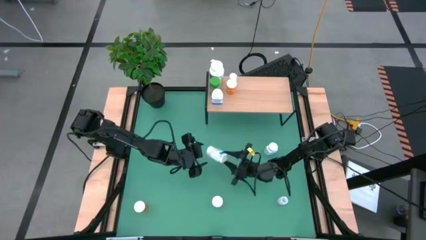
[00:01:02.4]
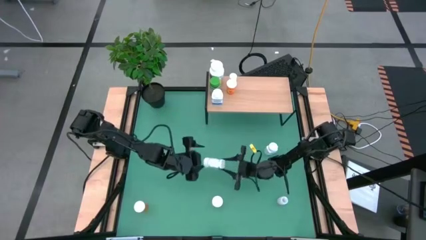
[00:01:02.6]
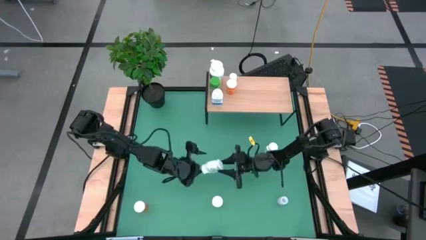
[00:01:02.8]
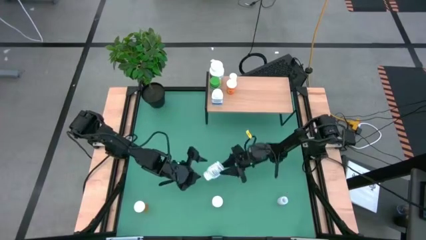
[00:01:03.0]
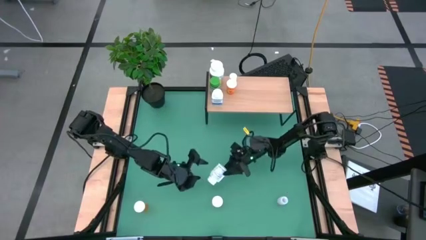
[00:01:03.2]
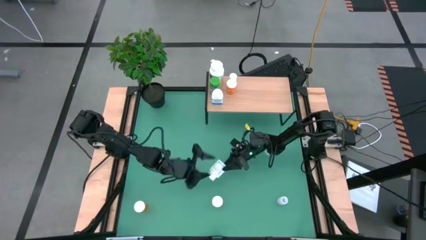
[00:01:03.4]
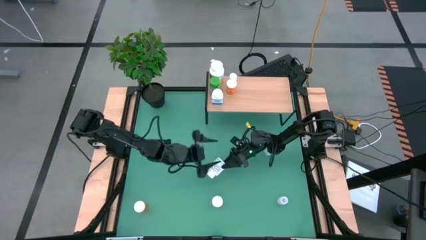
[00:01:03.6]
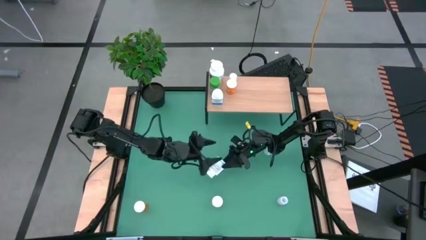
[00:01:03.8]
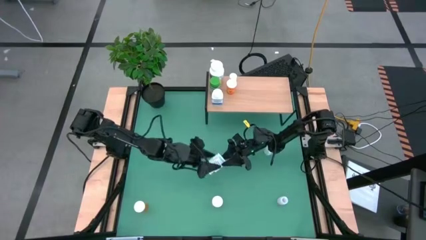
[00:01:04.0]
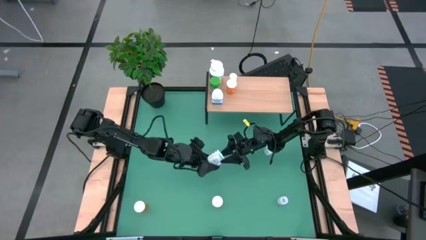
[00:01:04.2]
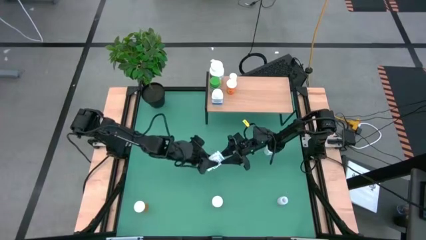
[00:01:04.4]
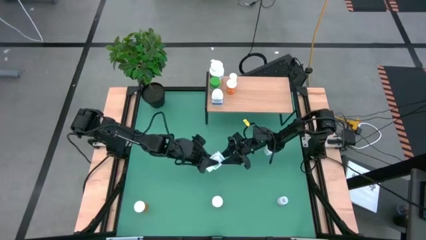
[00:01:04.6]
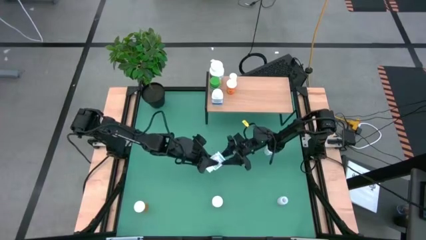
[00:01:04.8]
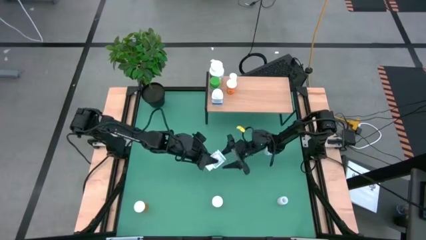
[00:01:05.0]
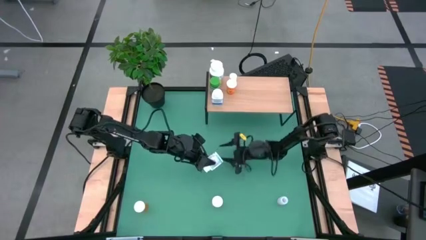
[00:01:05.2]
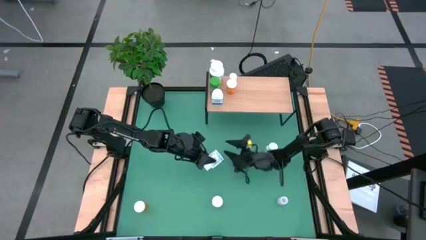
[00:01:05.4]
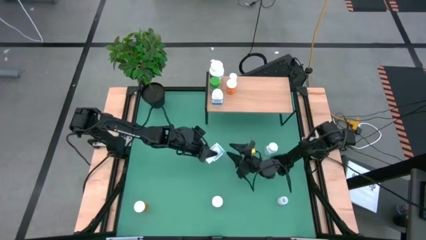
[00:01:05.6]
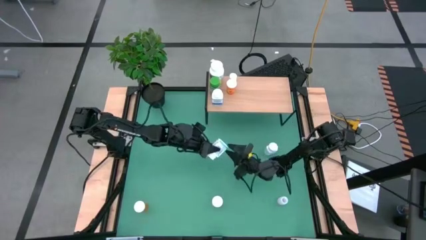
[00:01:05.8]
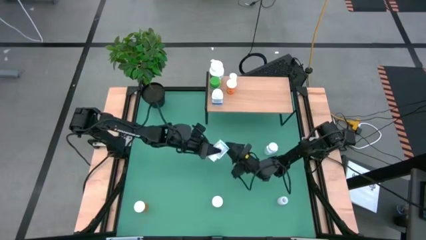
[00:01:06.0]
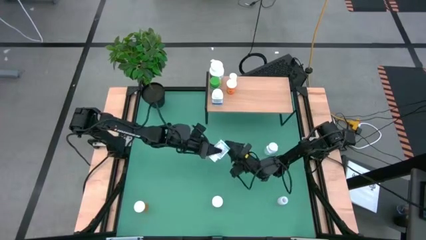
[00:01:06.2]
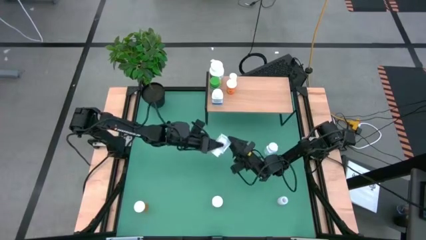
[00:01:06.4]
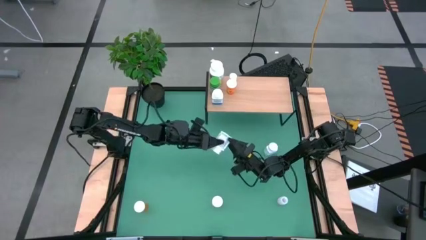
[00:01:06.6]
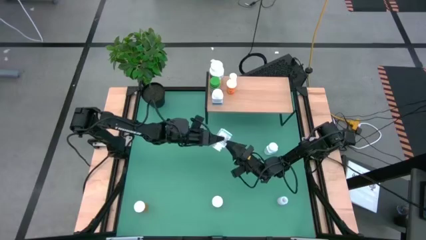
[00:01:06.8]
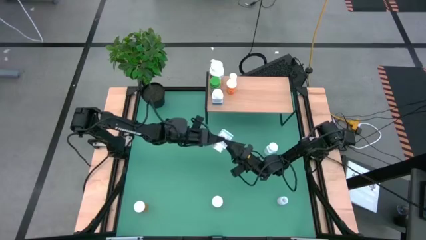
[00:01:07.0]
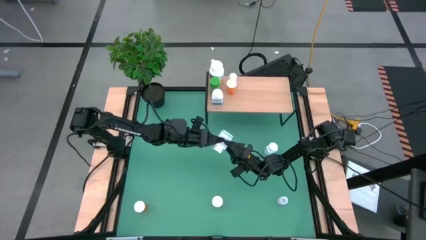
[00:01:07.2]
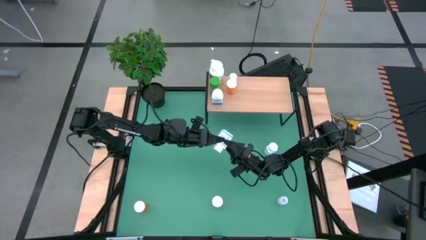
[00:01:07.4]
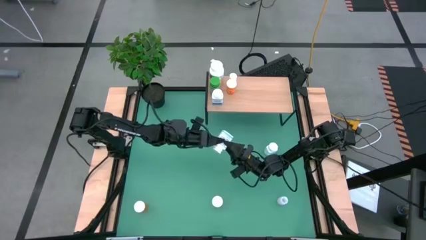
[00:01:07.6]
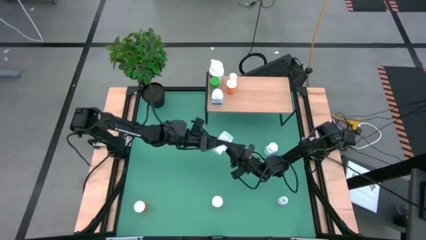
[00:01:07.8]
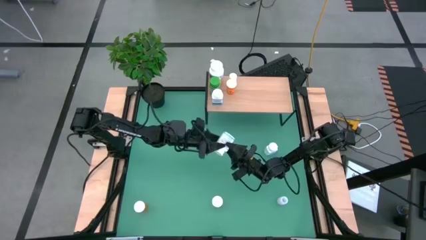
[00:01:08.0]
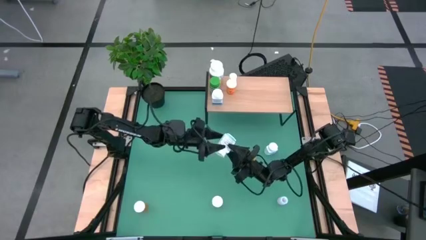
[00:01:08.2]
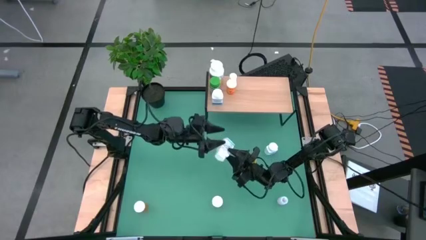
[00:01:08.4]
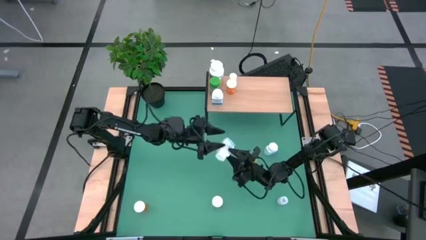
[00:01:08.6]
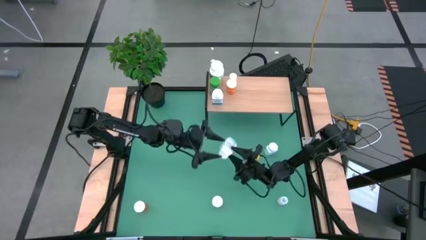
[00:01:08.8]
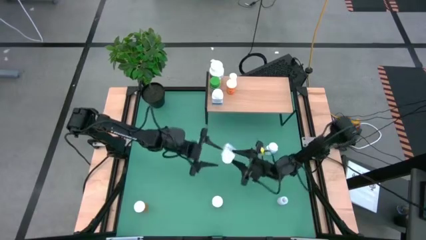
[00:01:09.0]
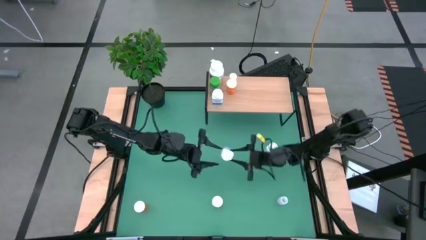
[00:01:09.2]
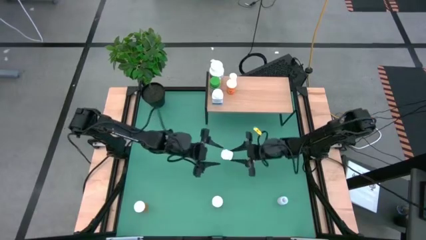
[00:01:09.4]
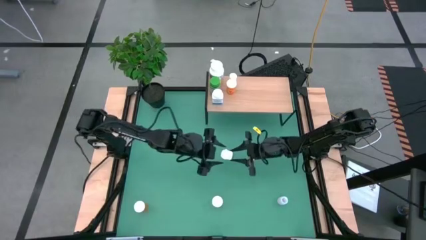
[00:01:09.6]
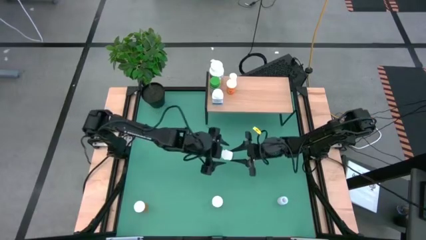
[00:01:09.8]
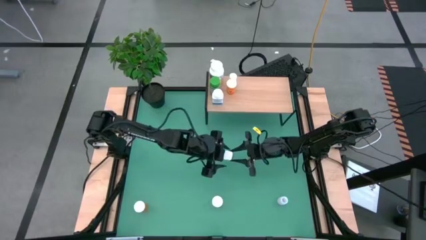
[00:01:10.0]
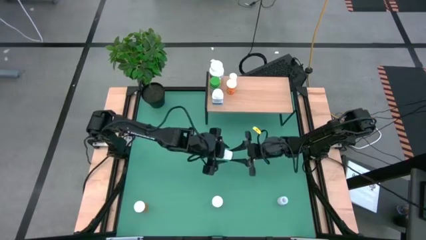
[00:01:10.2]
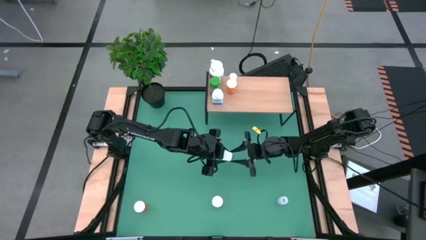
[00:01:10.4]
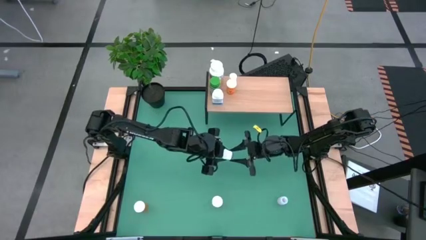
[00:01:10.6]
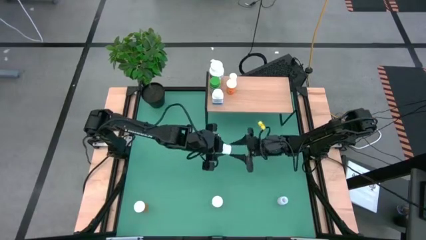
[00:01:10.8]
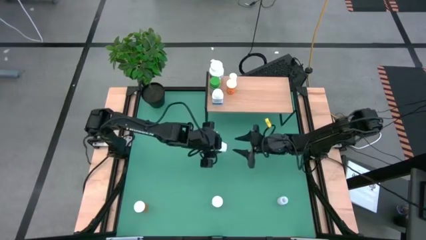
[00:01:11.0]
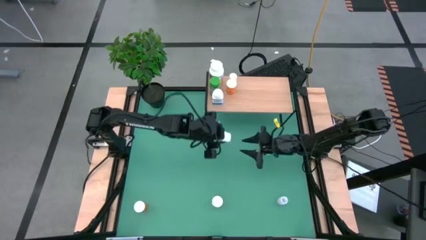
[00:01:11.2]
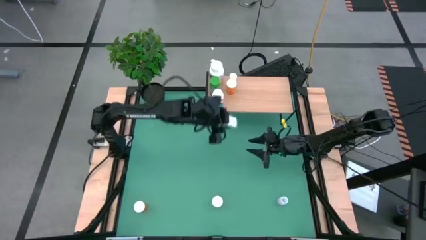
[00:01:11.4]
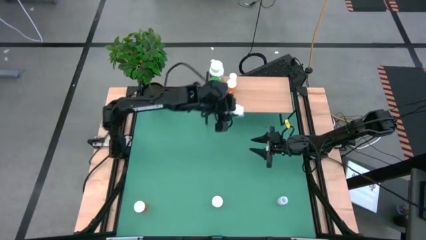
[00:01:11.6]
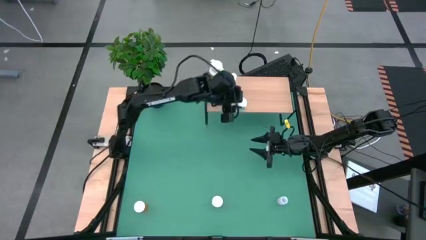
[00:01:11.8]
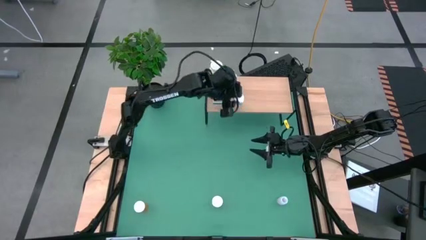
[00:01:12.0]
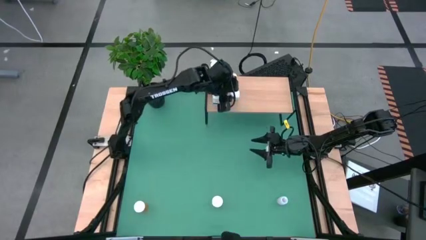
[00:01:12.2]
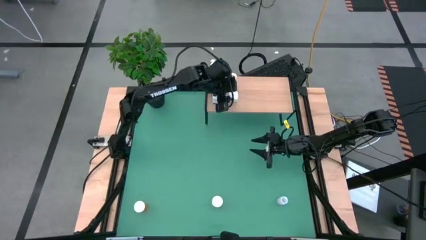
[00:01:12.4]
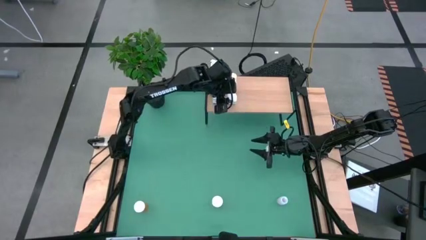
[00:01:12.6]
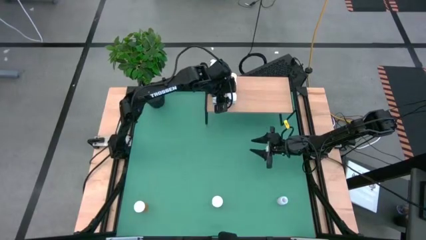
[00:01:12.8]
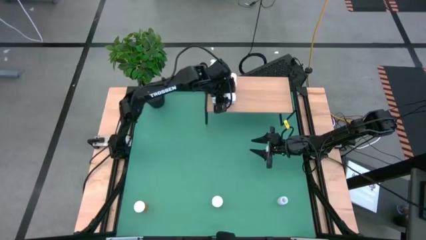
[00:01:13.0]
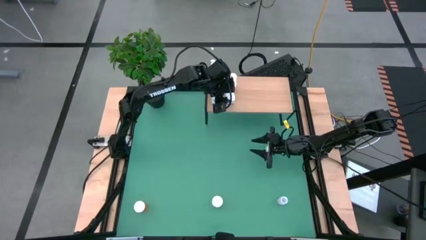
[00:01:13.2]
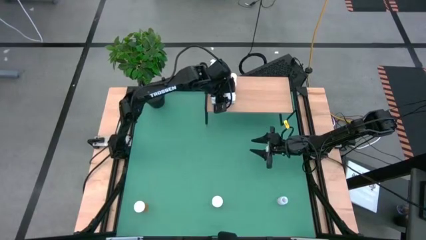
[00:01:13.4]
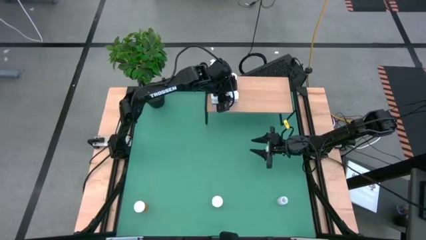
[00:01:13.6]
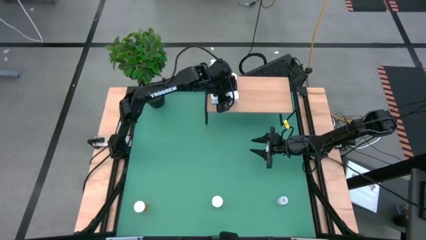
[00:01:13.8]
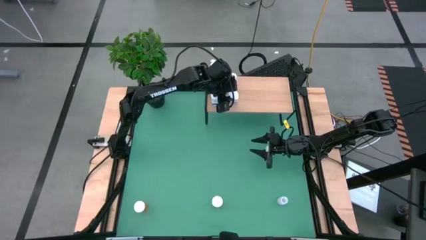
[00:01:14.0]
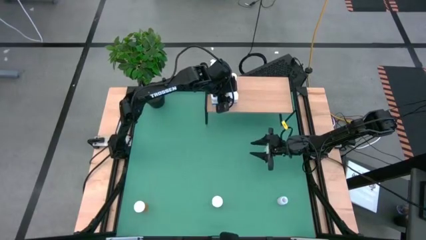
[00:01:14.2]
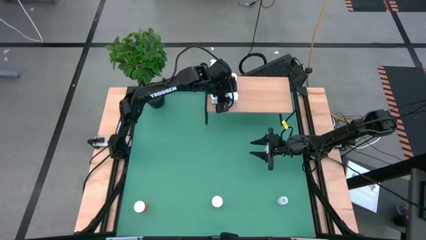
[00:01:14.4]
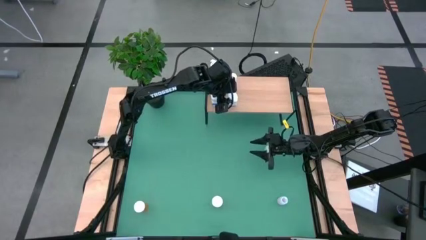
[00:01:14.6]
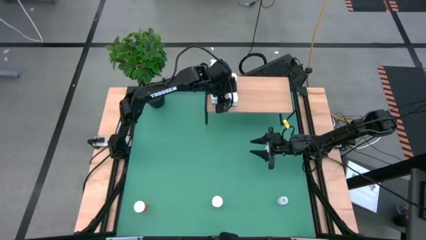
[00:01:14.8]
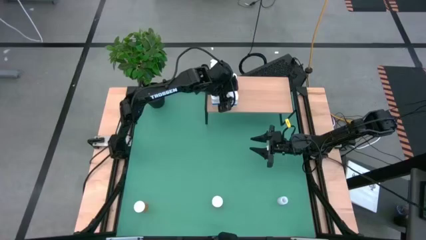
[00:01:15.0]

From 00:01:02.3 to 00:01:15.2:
Task: Pick and place medicine bottles onto shelf by color
Put the bottom white blue medicine bottle on the shelf

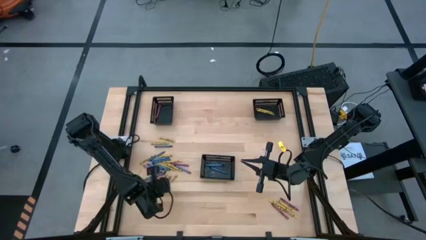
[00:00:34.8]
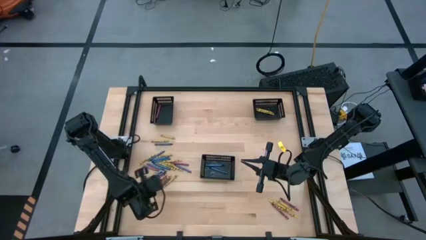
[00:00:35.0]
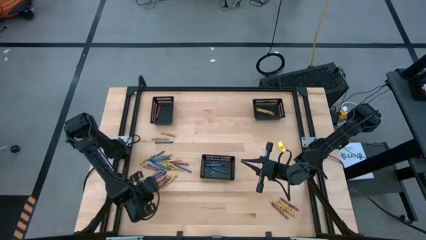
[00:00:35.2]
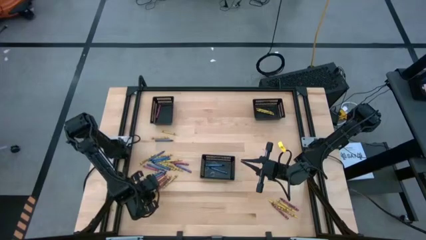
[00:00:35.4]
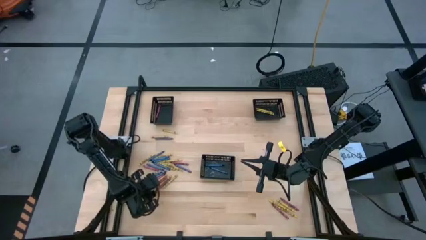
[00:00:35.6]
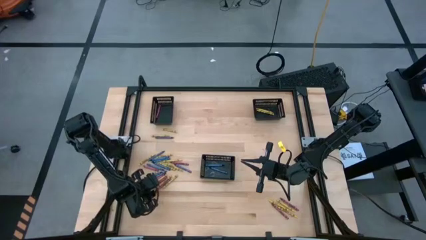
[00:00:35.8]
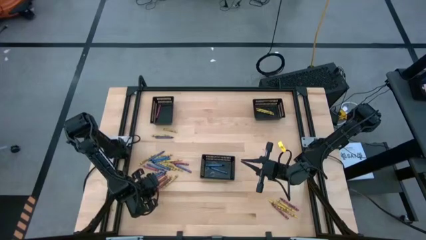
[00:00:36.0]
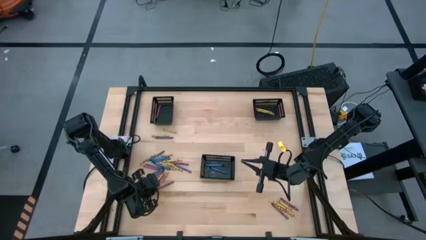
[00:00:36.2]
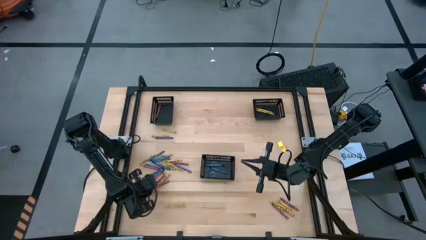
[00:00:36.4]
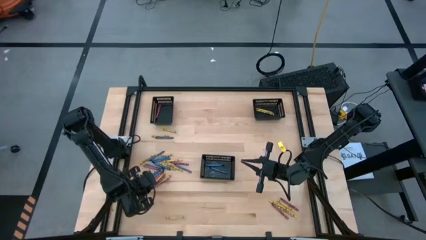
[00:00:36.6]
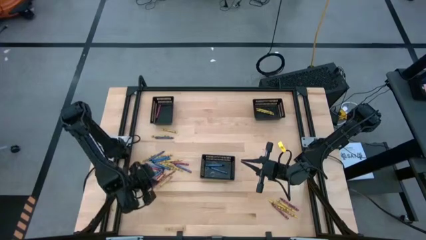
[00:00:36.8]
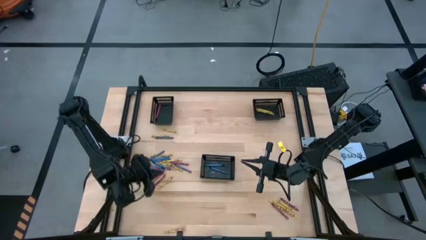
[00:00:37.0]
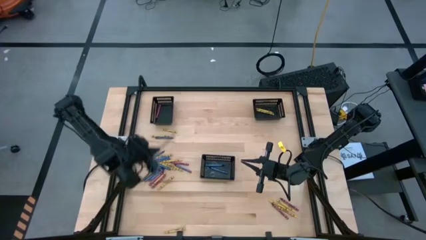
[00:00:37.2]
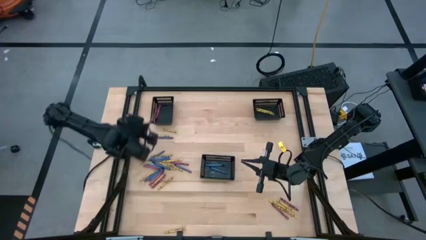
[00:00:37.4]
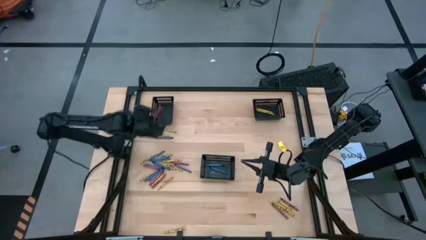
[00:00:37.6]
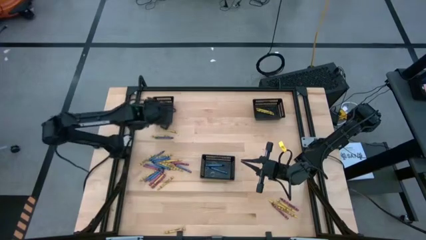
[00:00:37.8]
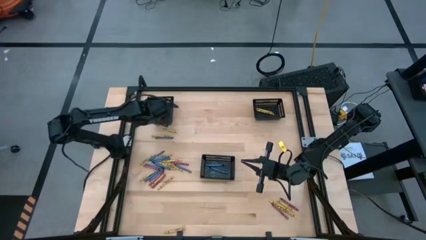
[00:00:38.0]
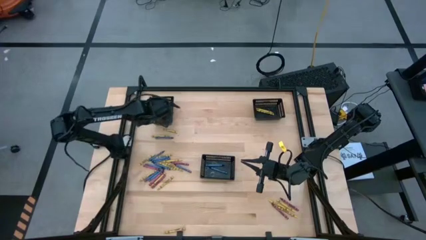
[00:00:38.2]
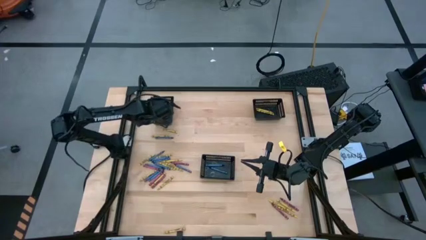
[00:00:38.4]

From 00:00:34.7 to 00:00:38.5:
Task: Sort crayons
Put the pink crayon into the top left black bin
